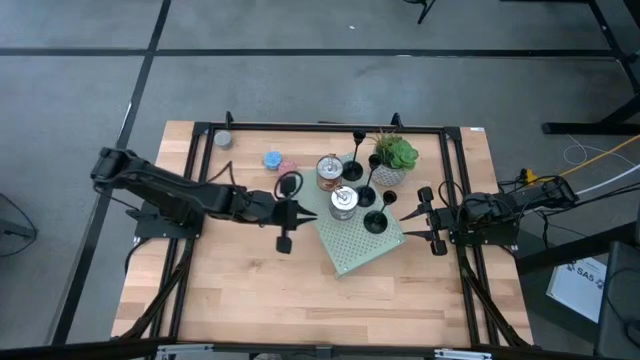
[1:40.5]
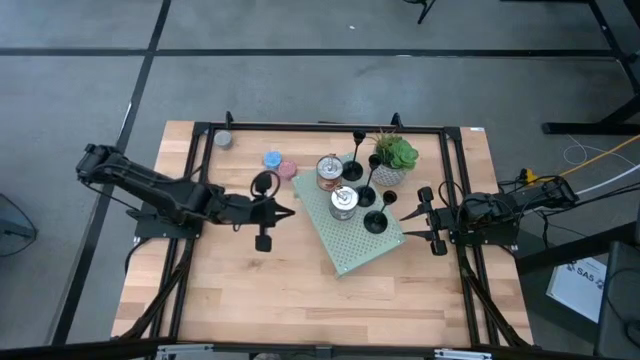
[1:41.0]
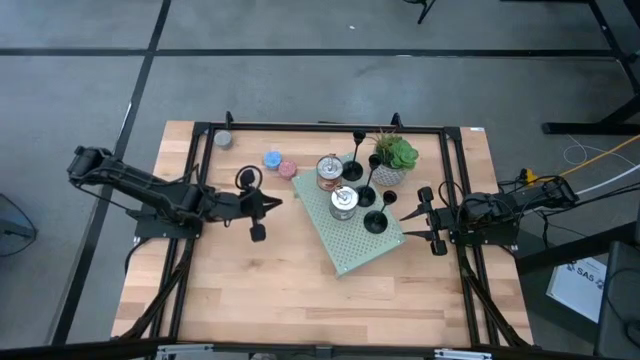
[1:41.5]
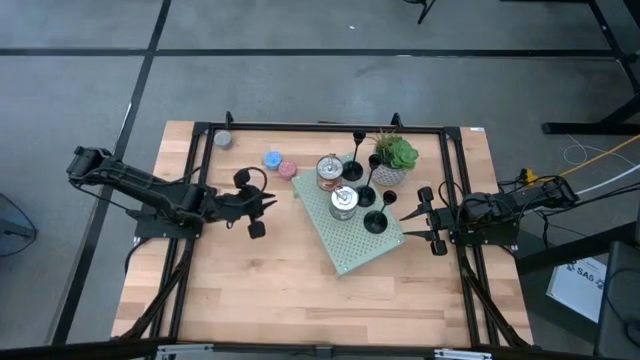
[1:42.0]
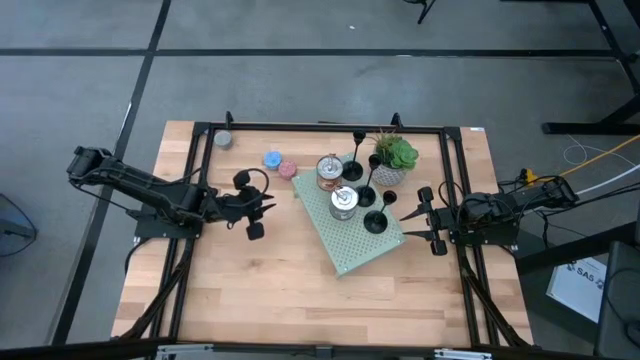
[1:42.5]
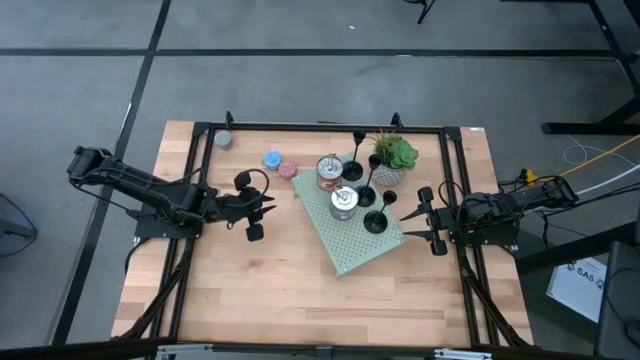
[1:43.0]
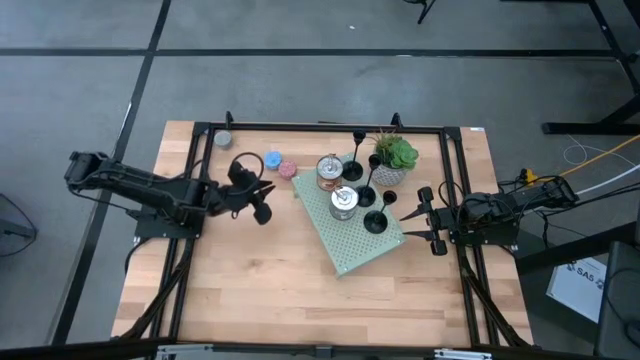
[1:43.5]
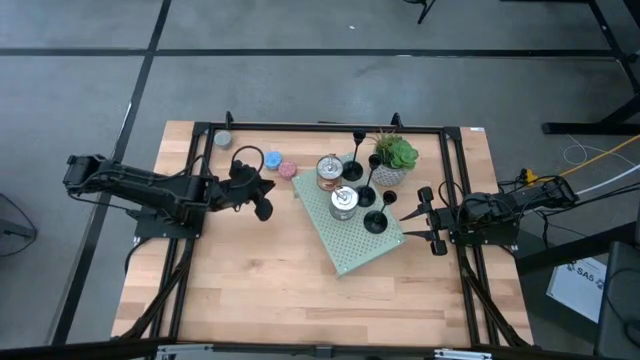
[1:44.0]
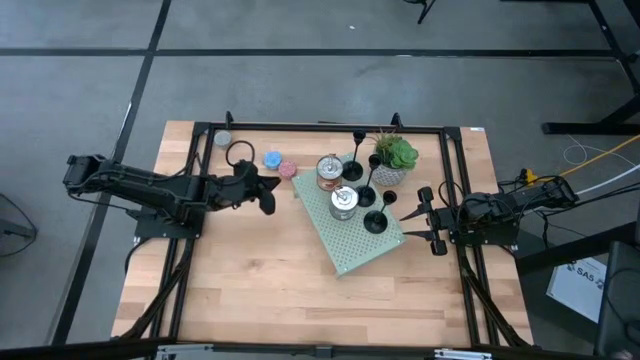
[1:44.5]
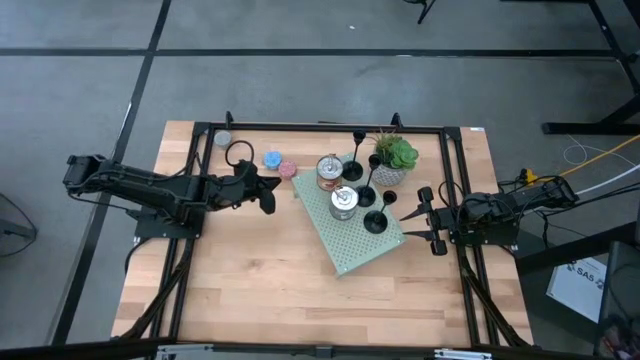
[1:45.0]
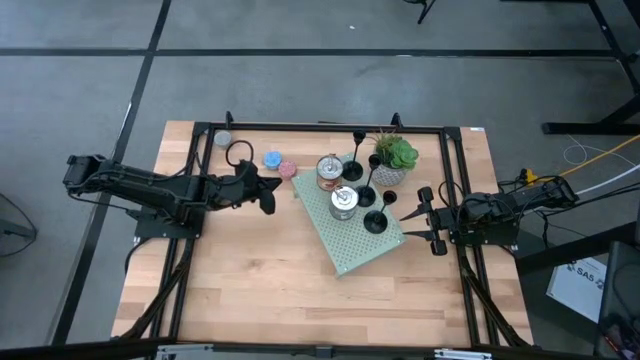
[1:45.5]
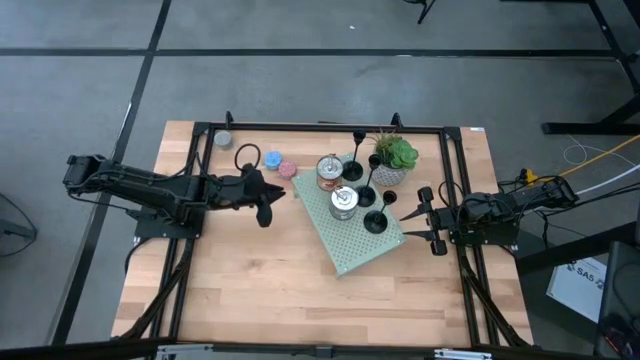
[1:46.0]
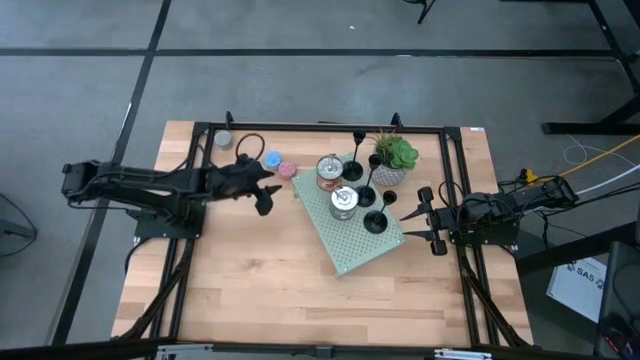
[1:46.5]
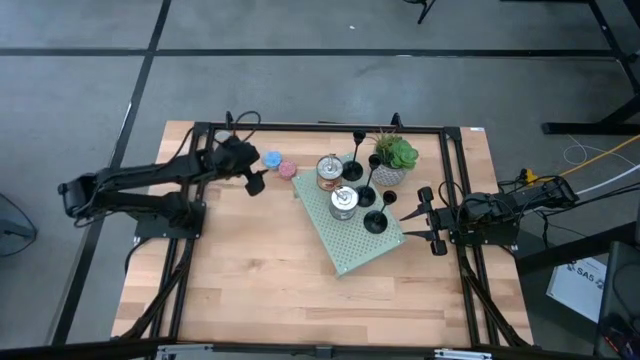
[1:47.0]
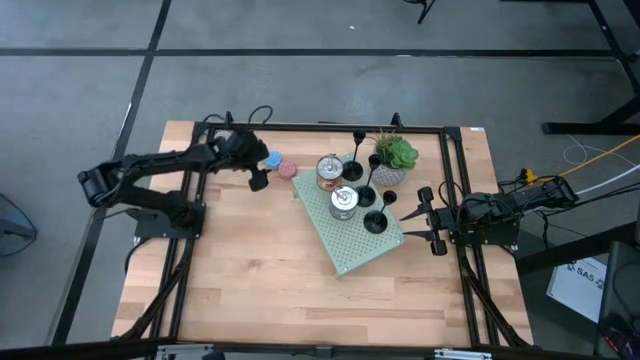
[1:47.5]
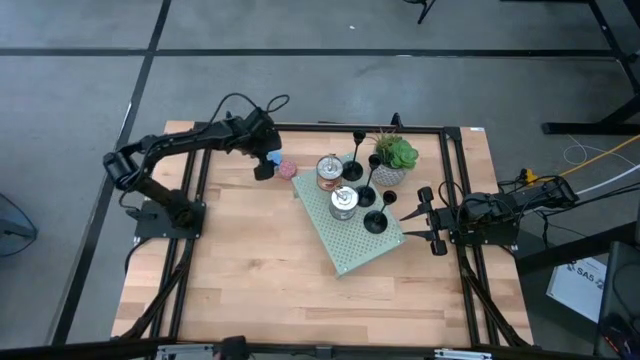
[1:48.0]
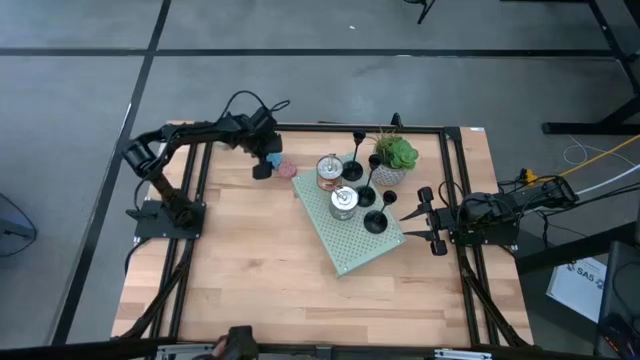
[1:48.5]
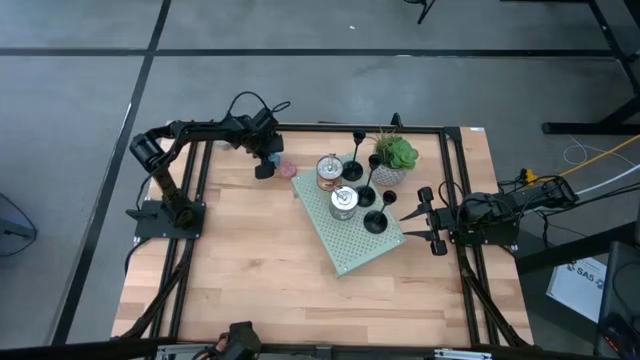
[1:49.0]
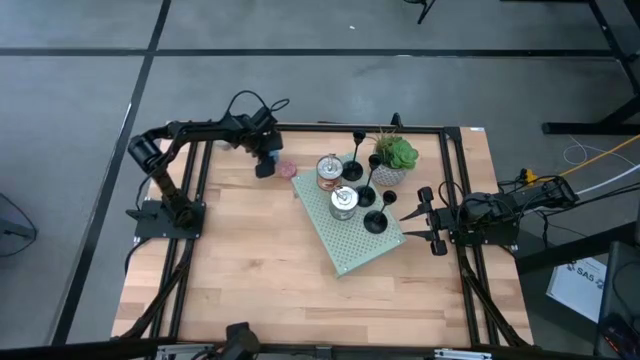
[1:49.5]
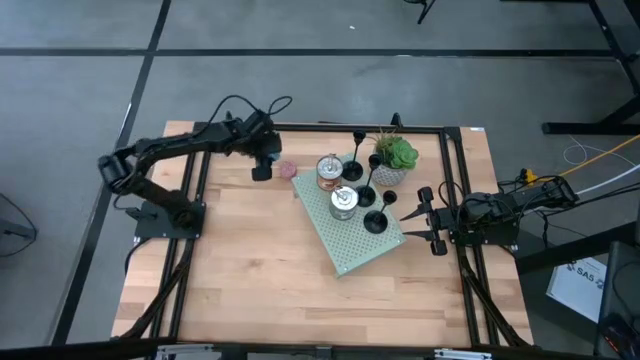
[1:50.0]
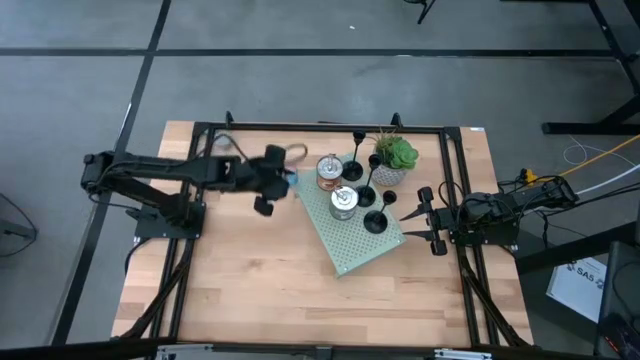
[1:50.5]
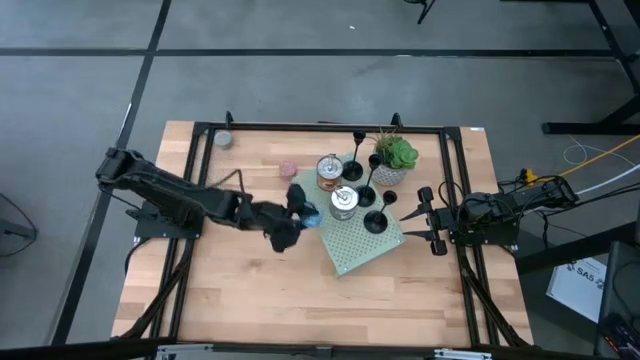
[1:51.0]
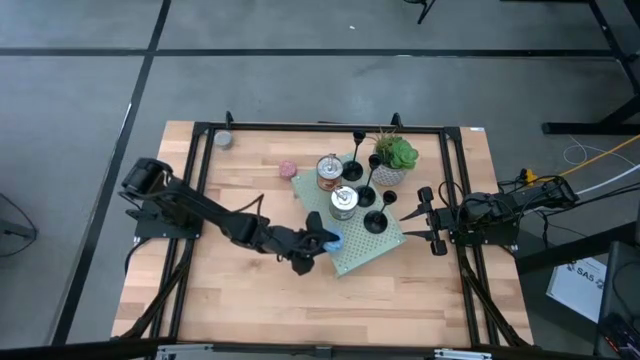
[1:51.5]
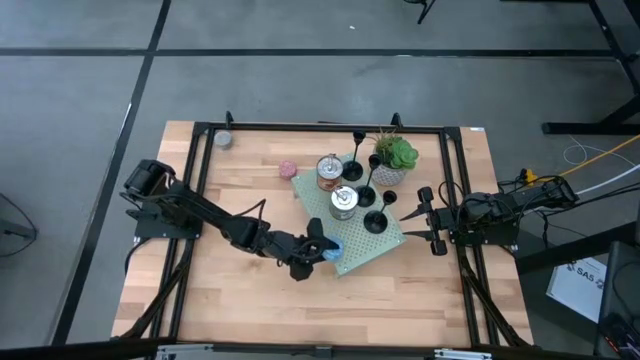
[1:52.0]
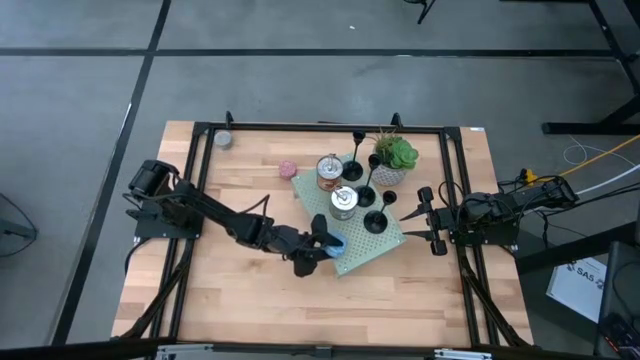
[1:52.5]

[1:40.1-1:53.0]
Task: Pick & Place candle stick holders
Put the blue scented candle on the shelf

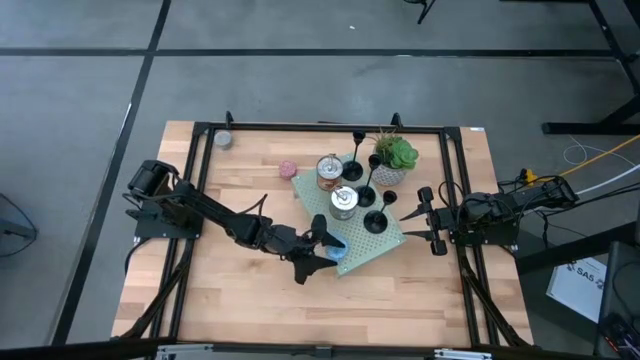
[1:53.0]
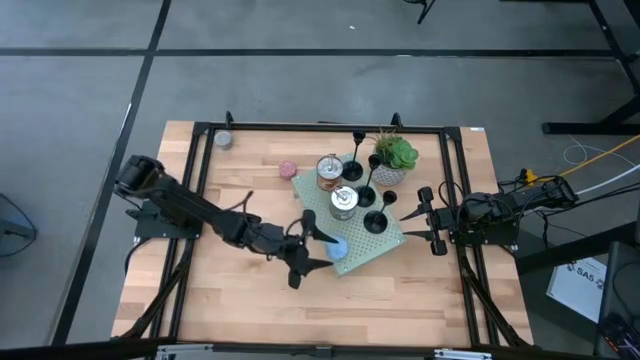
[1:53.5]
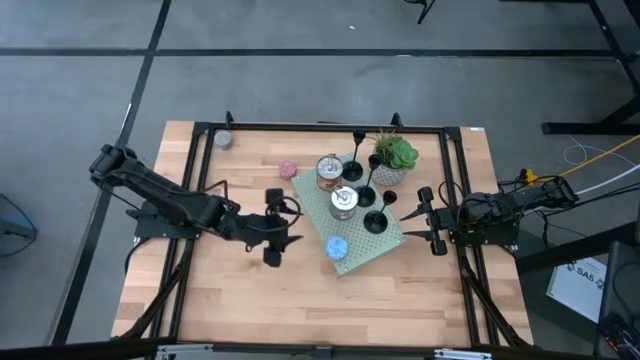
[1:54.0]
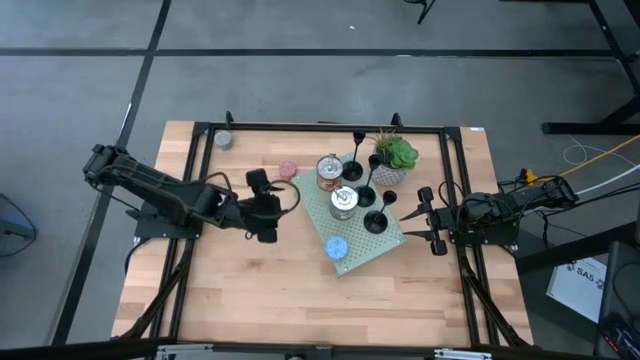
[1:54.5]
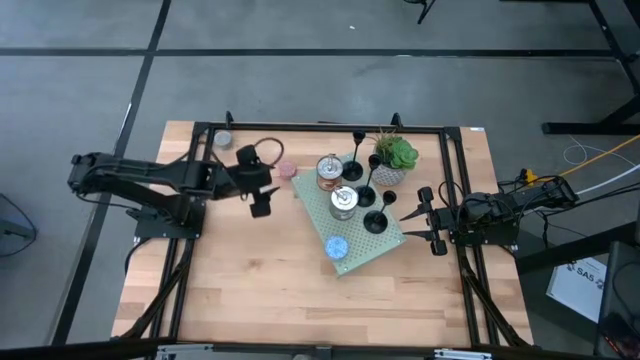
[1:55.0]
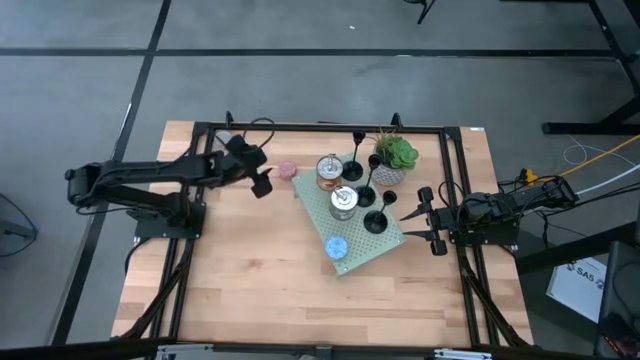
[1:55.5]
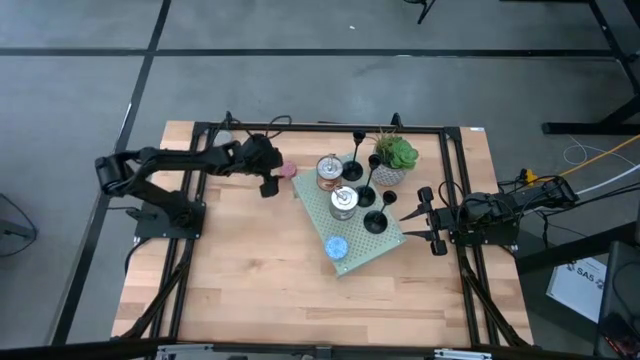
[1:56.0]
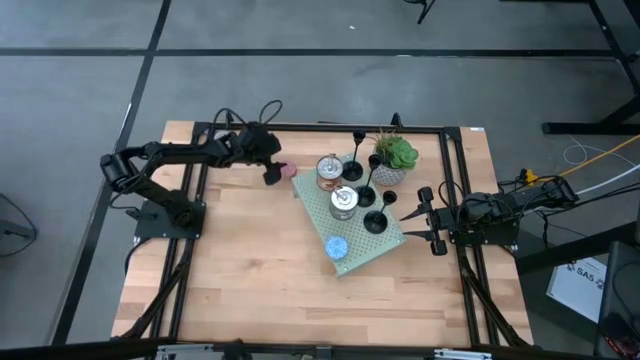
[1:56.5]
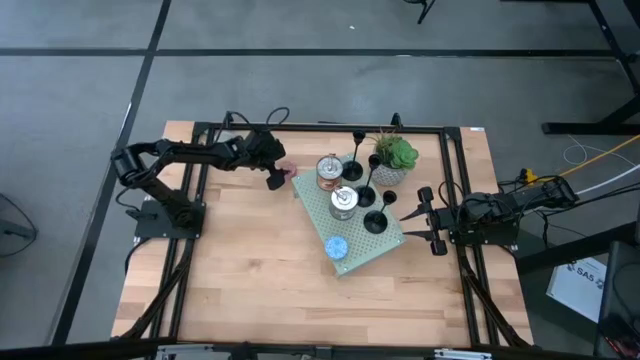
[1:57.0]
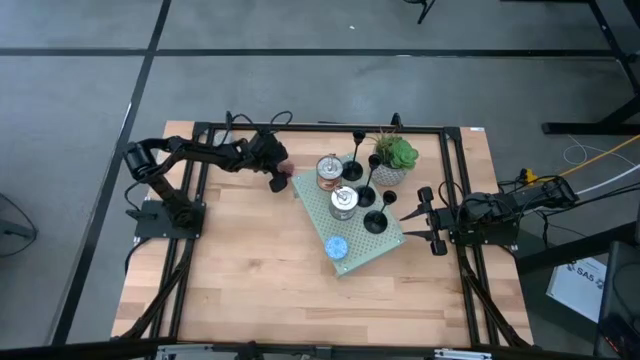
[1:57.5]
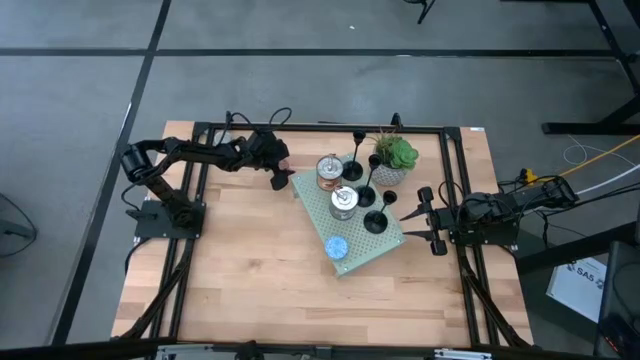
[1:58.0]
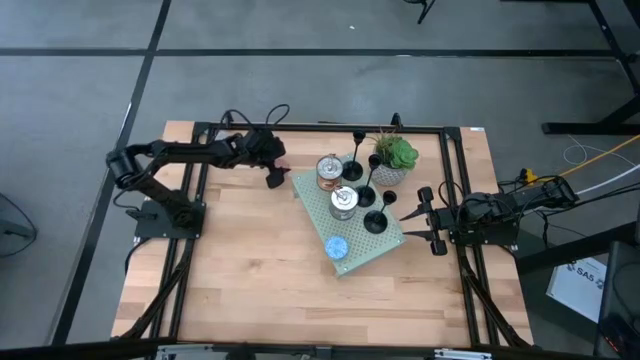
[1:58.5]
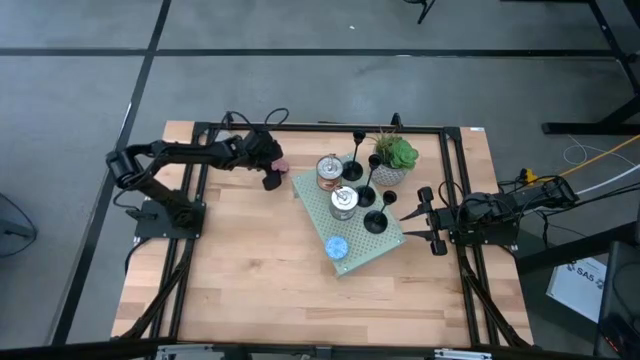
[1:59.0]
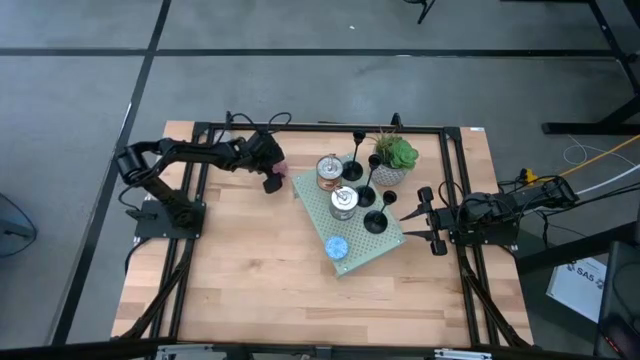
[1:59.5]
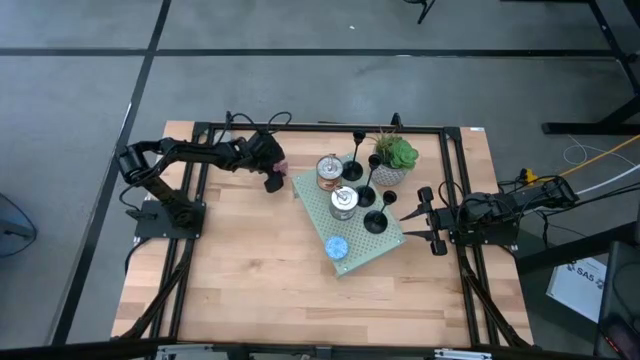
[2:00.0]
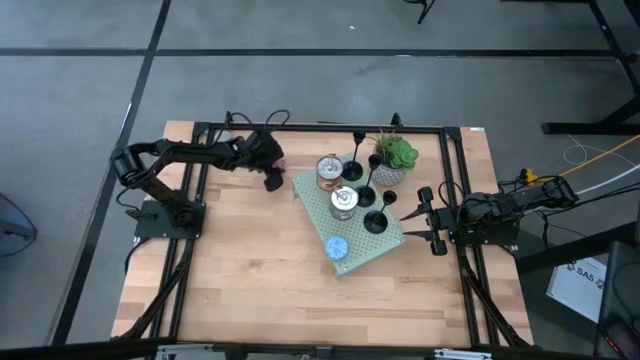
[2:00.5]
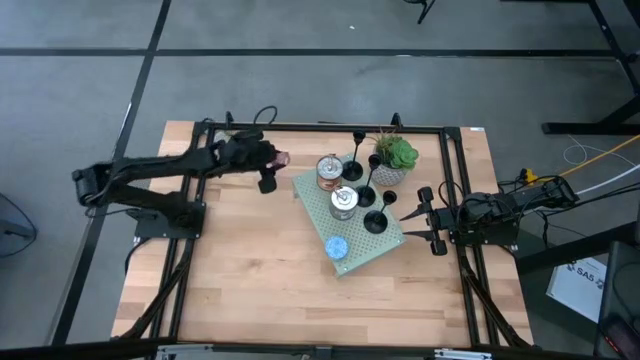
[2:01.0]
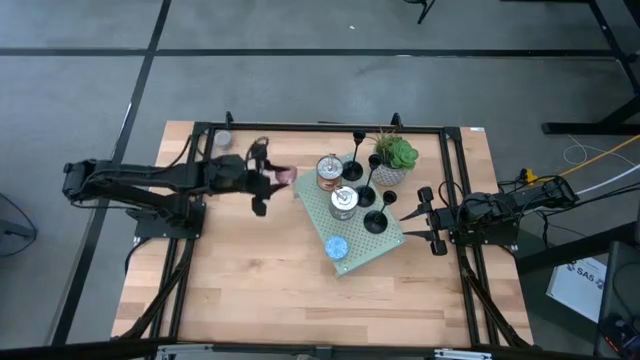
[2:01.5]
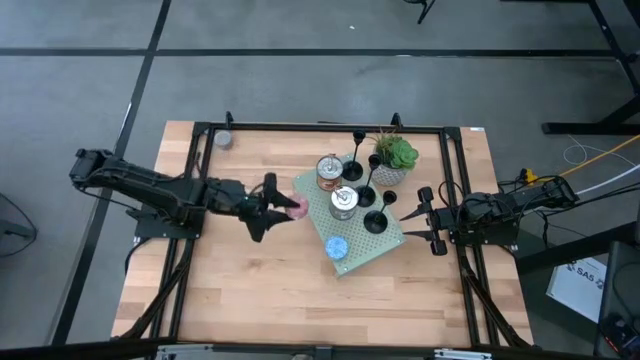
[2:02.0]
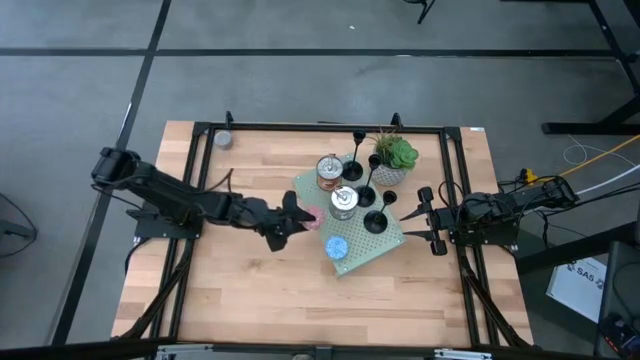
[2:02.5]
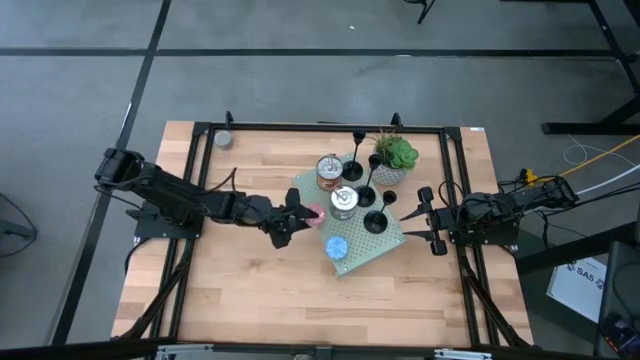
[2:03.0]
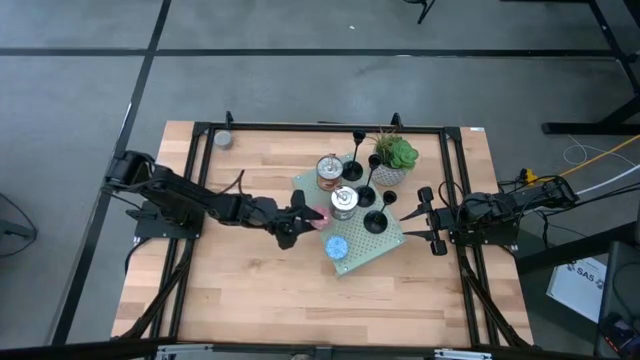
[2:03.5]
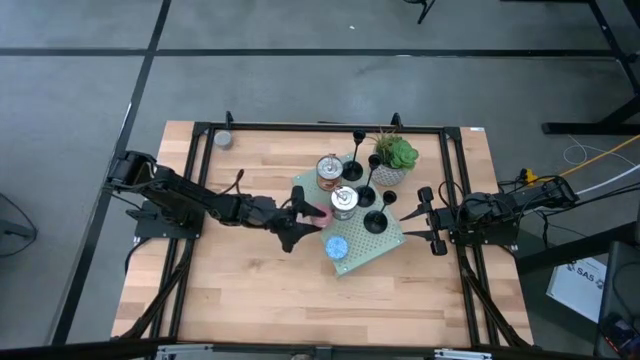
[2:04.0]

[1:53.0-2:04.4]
Put the pink scented candle on the shelf aligned with the other scented candle
